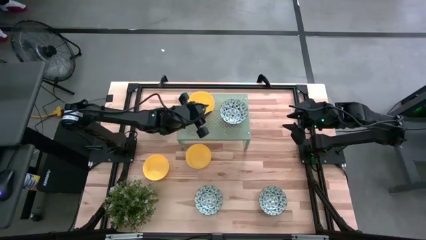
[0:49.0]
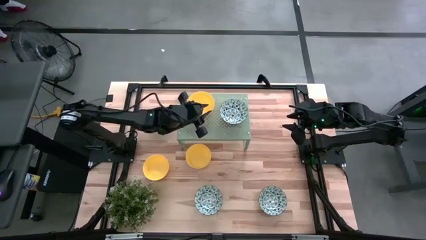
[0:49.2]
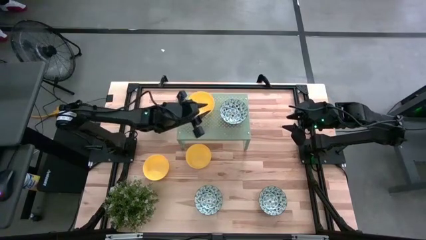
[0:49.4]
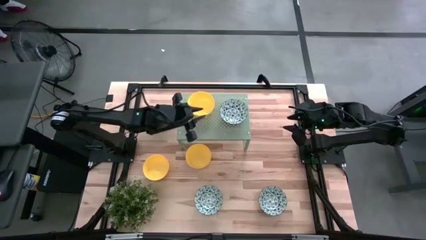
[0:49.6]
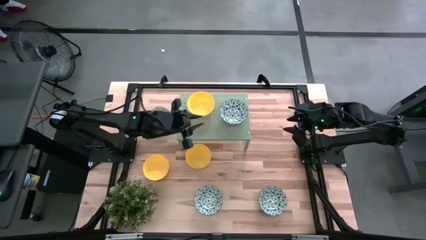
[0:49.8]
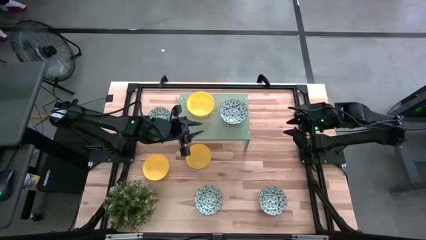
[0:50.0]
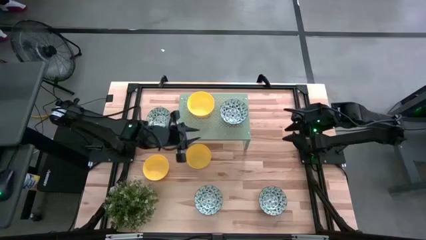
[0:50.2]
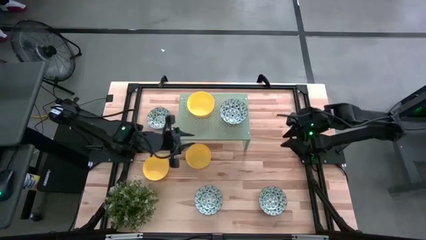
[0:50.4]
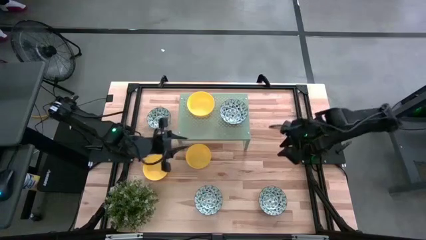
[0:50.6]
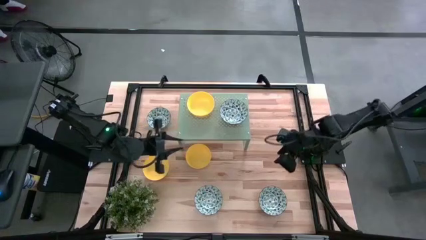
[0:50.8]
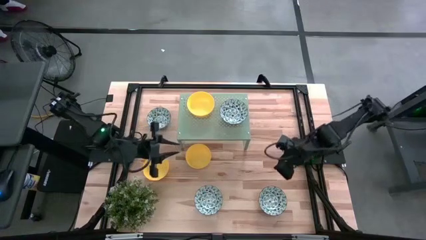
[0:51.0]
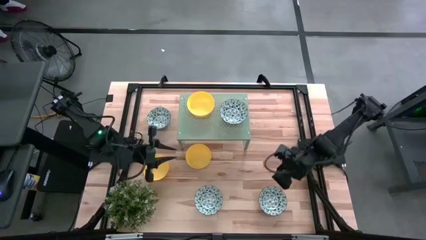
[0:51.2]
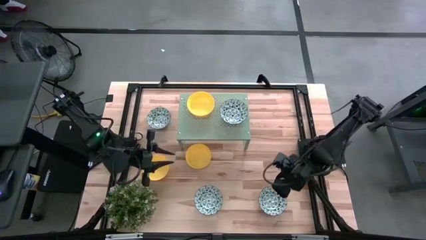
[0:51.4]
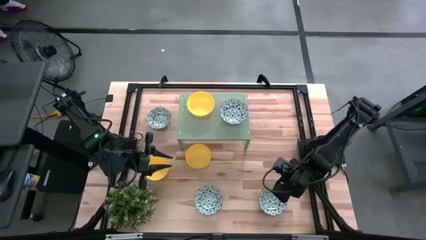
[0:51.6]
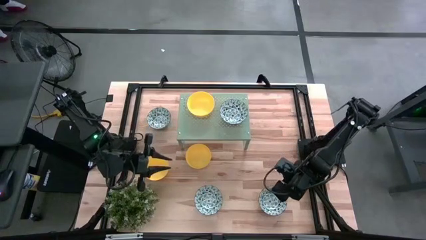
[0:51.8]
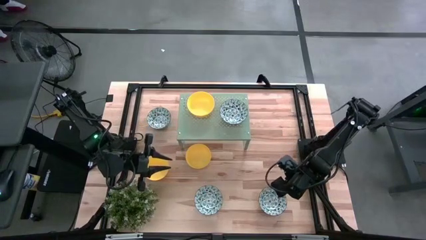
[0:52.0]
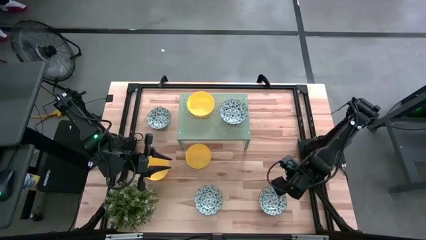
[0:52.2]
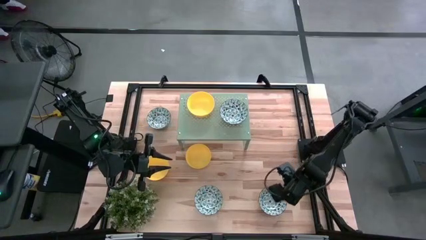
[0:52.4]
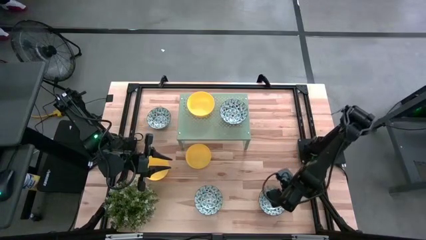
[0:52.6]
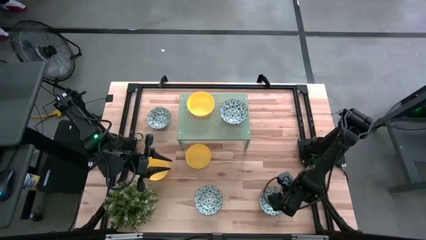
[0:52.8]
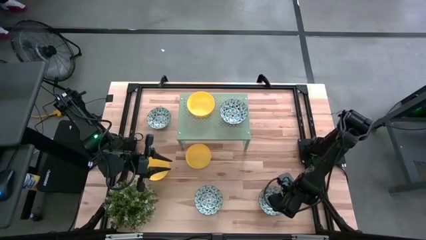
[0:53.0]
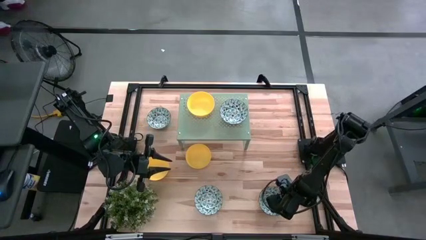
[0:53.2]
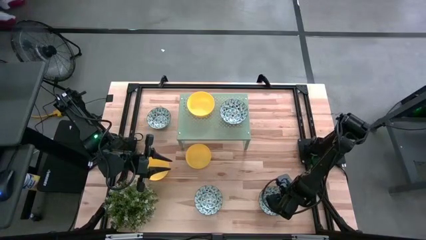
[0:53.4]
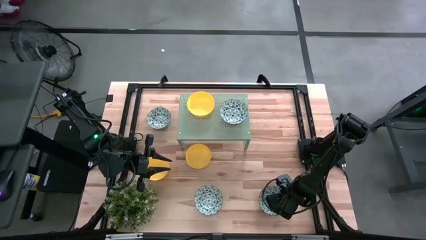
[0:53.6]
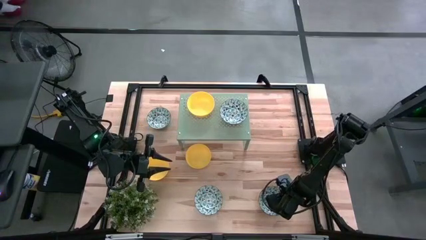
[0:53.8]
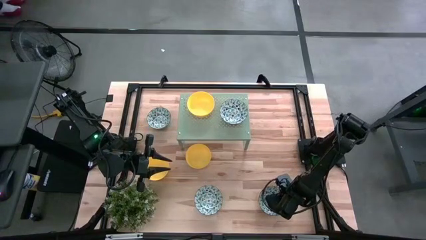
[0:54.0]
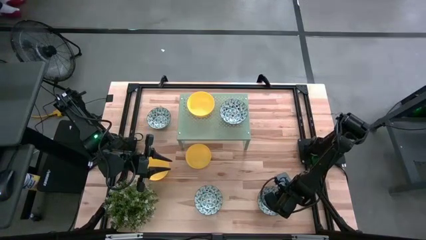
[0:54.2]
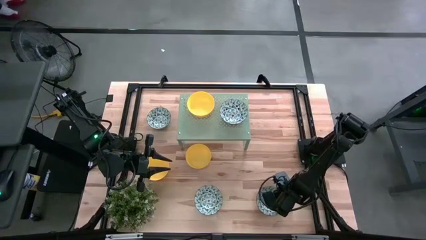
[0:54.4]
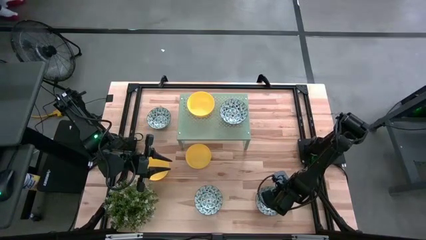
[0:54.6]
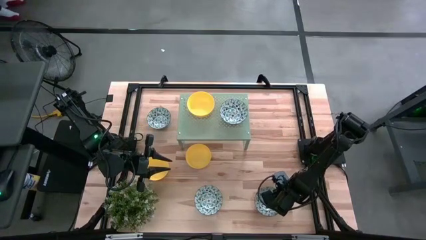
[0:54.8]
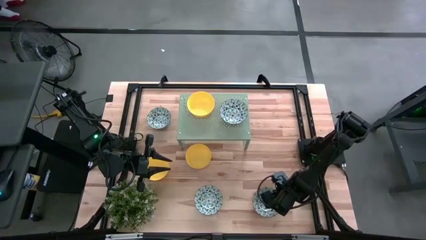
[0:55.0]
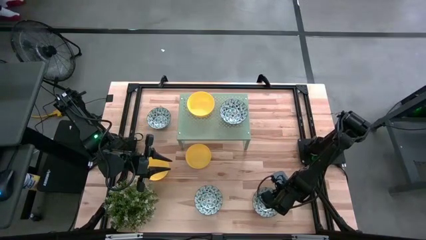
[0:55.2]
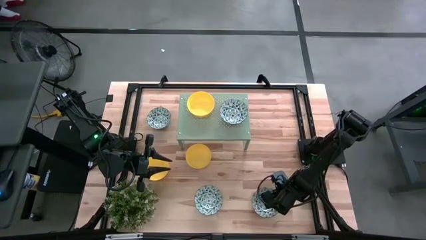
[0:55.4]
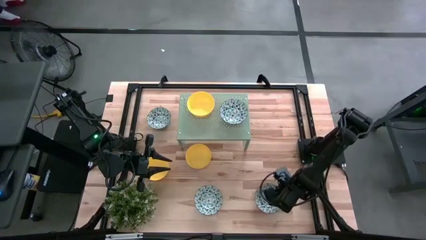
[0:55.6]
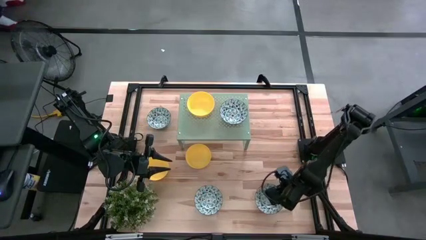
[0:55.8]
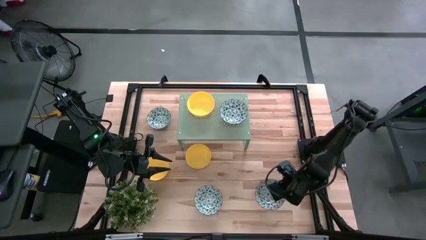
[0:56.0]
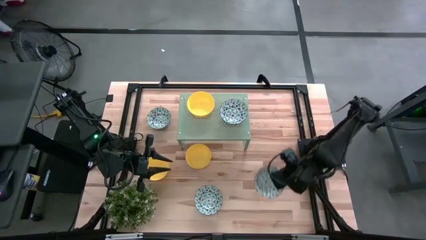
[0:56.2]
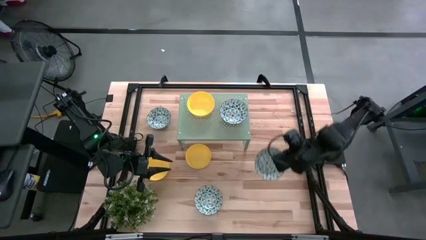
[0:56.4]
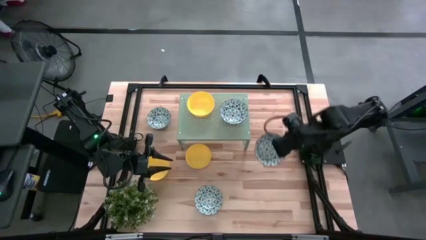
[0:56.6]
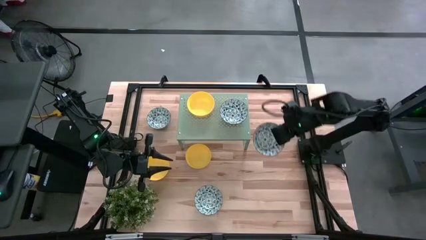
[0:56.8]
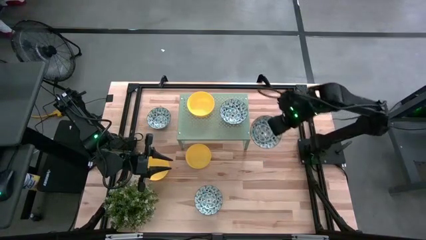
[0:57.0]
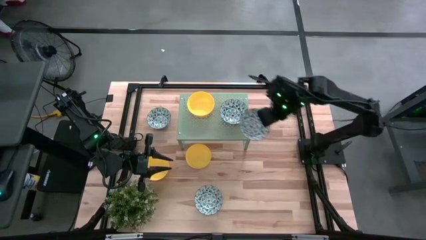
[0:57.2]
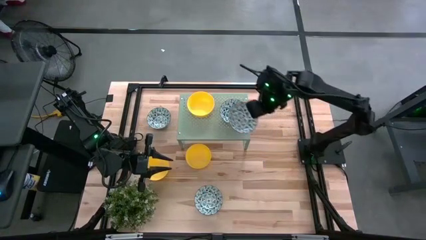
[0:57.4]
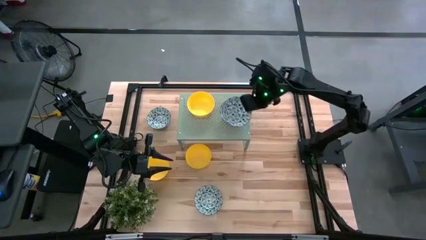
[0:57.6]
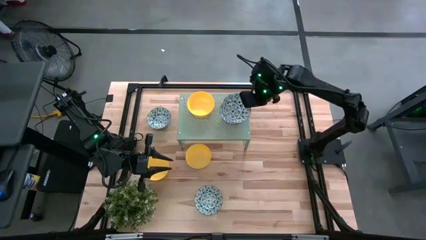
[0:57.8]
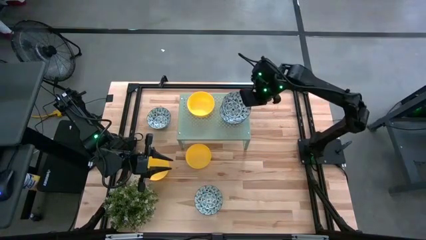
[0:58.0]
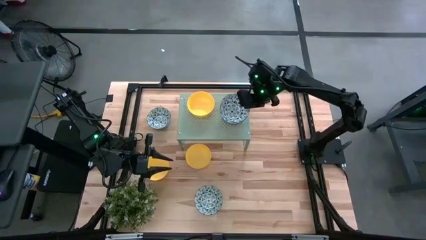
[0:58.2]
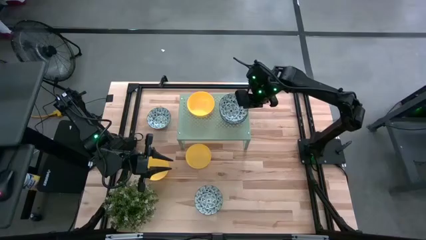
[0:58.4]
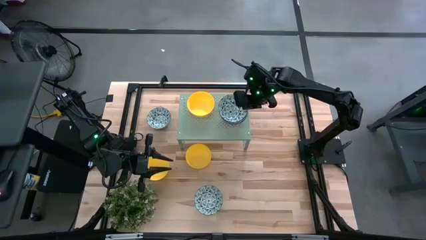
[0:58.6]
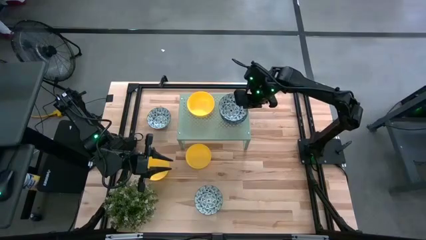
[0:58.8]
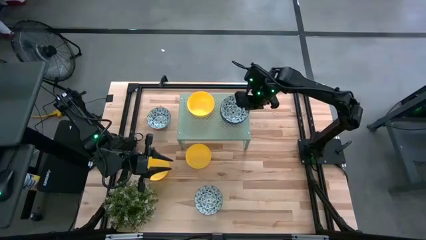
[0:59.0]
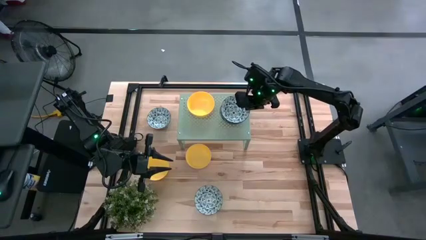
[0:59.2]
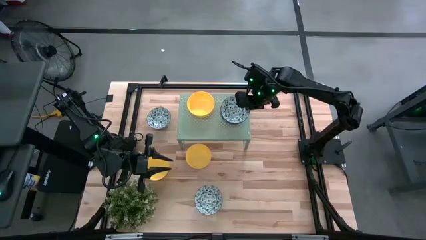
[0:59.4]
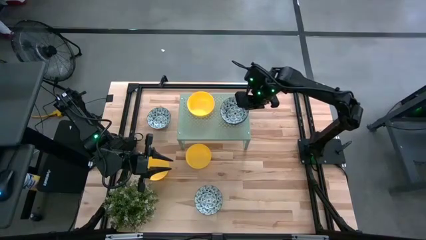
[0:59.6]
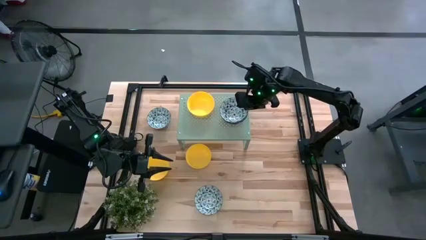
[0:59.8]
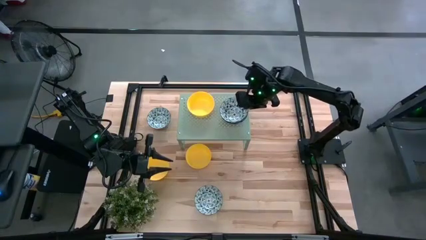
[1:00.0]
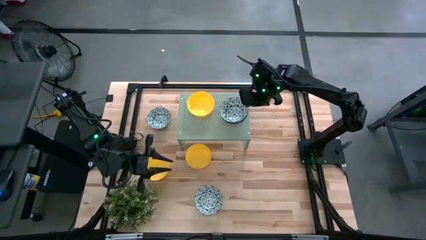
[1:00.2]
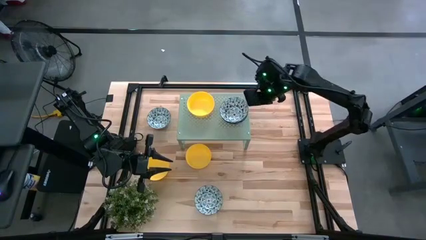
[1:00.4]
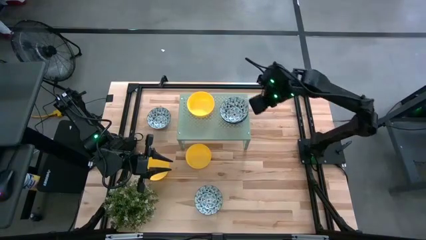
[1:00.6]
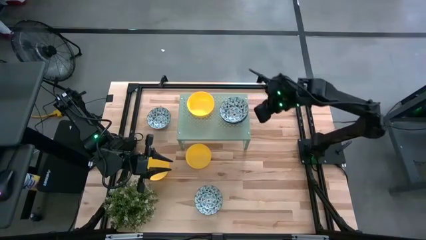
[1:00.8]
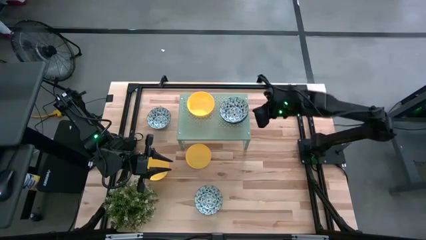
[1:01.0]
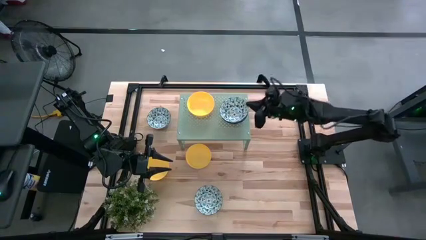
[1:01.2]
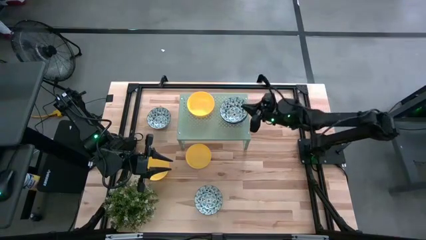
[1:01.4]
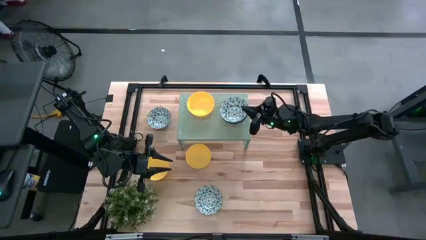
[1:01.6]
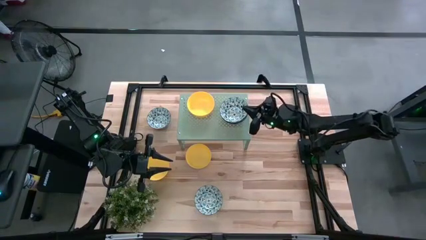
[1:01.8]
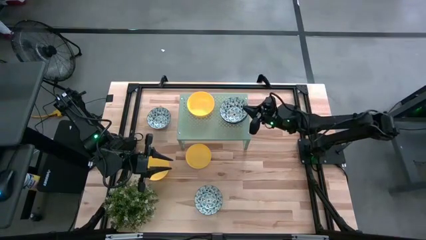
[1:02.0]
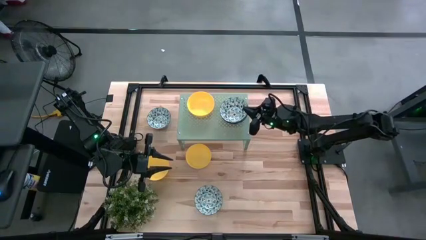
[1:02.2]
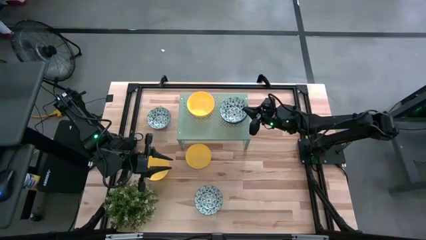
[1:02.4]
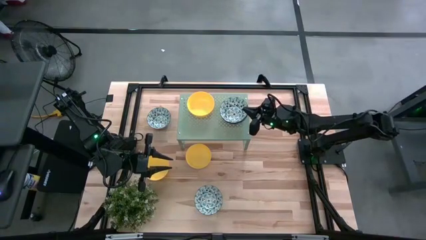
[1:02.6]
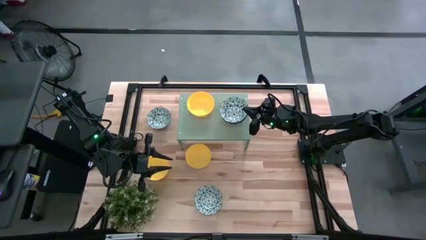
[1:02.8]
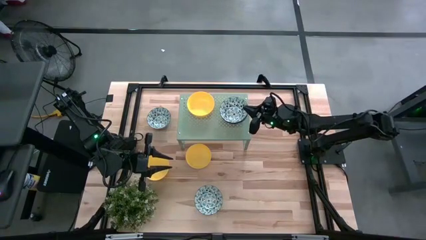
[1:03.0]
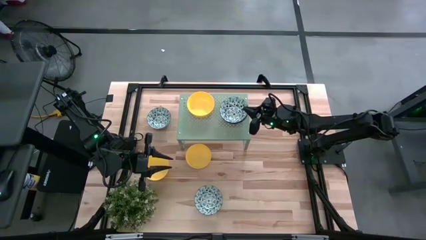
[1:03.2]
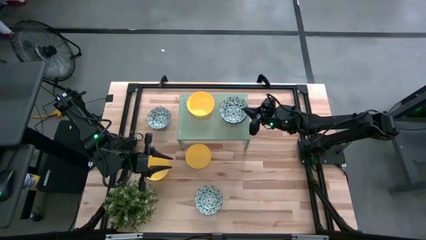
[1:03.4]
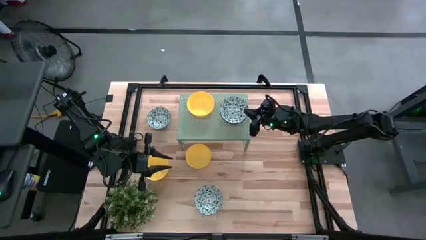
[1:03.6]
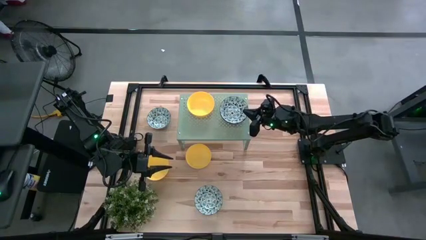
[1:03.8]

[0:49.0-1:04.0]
Task: Pick & Place Mini bowls
Stack the blue bowl on top of the blue bowl on the shelf
